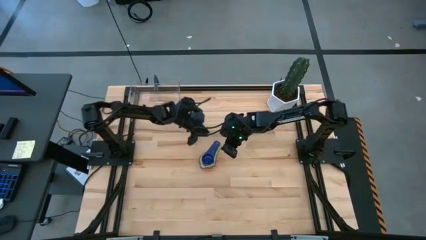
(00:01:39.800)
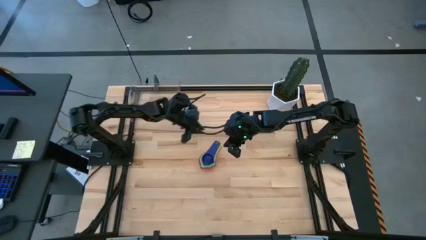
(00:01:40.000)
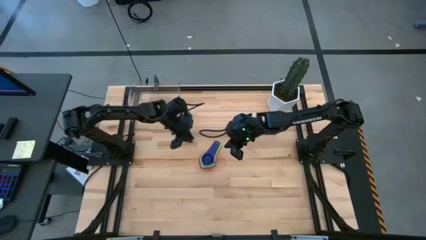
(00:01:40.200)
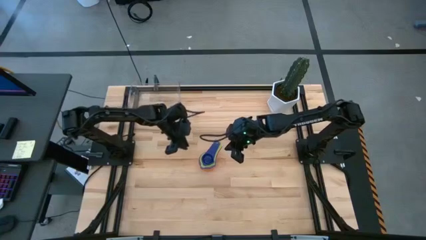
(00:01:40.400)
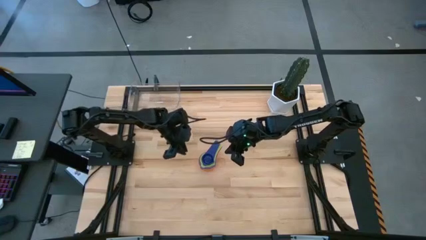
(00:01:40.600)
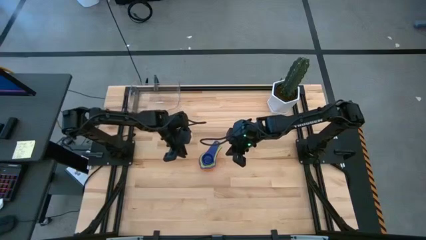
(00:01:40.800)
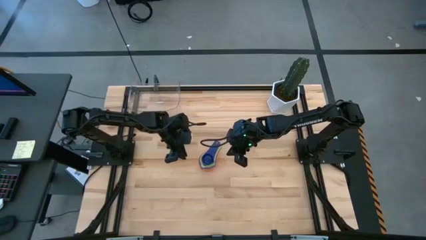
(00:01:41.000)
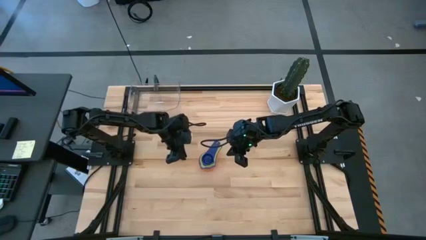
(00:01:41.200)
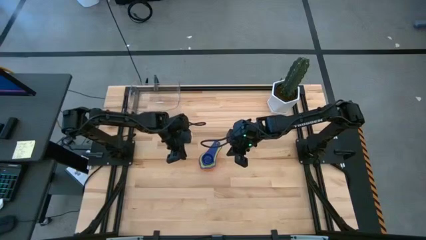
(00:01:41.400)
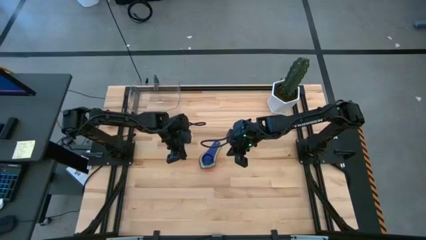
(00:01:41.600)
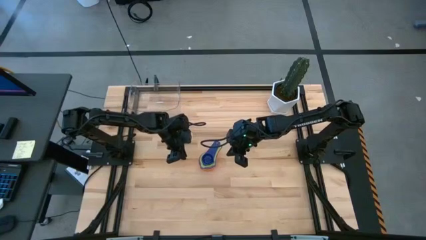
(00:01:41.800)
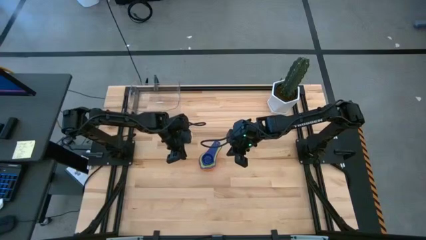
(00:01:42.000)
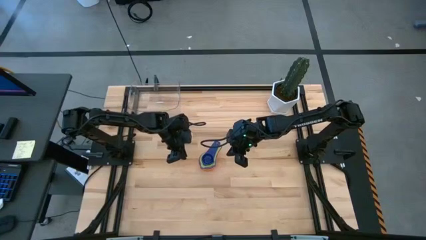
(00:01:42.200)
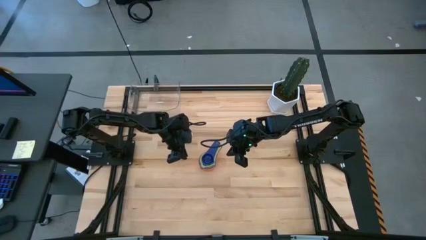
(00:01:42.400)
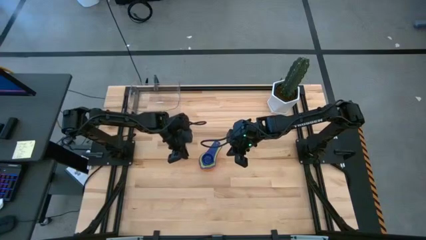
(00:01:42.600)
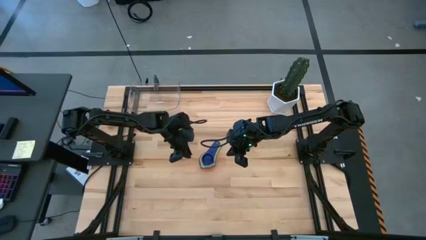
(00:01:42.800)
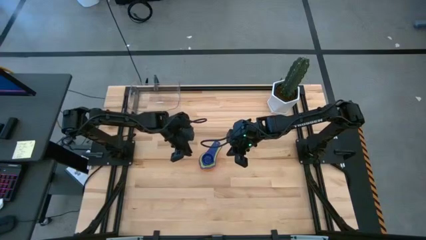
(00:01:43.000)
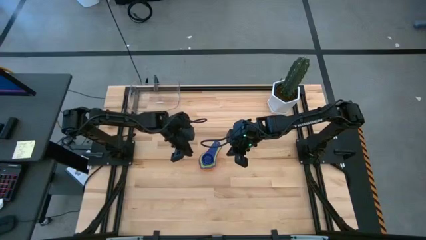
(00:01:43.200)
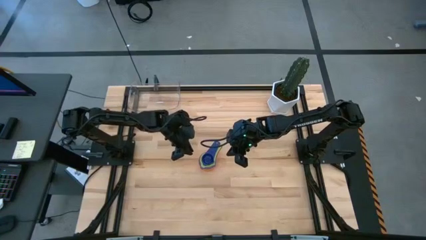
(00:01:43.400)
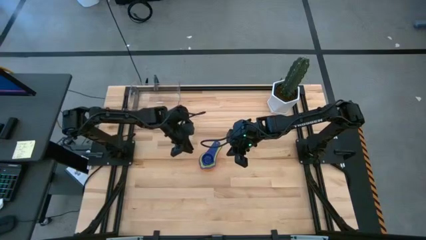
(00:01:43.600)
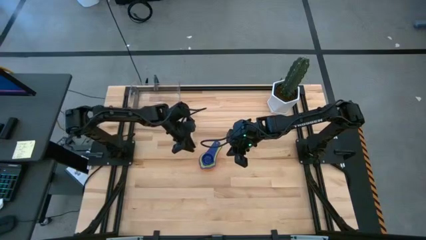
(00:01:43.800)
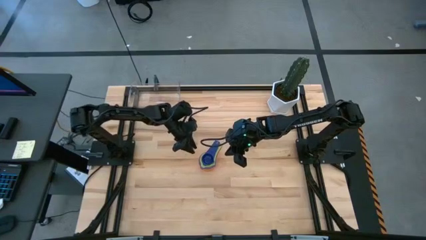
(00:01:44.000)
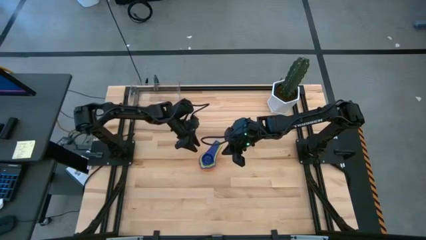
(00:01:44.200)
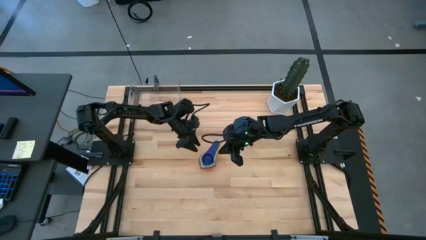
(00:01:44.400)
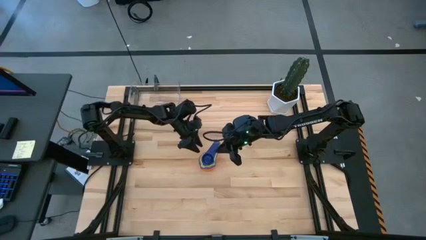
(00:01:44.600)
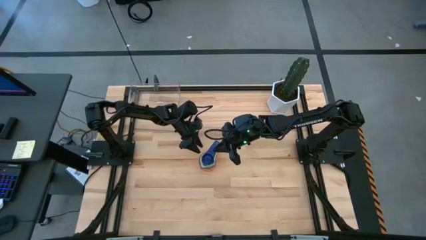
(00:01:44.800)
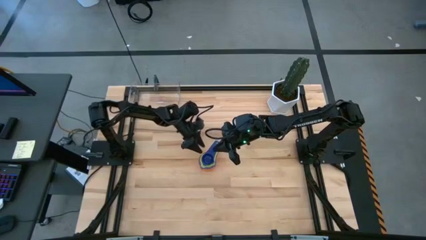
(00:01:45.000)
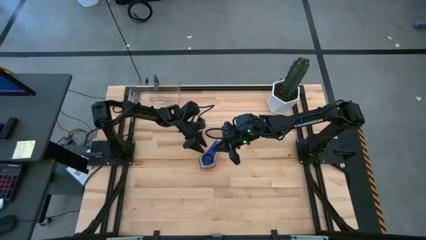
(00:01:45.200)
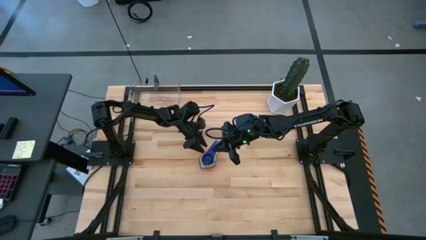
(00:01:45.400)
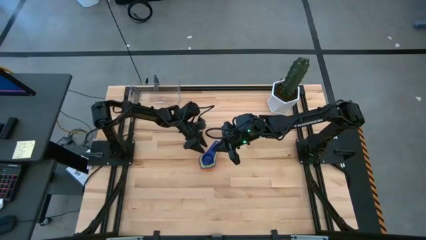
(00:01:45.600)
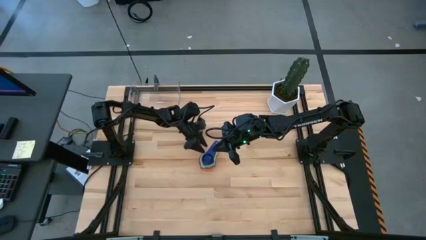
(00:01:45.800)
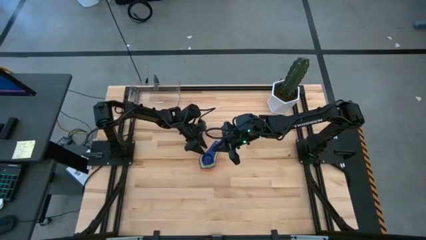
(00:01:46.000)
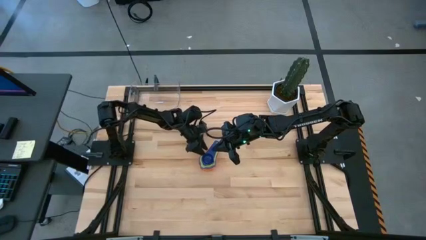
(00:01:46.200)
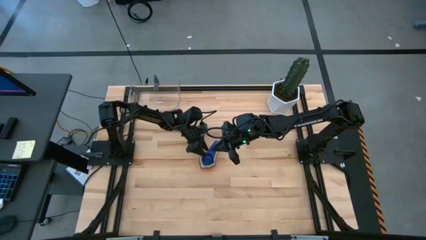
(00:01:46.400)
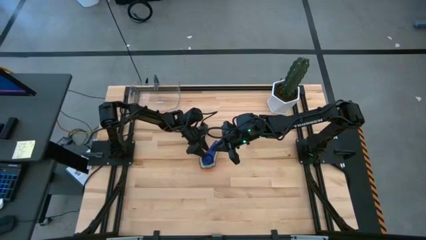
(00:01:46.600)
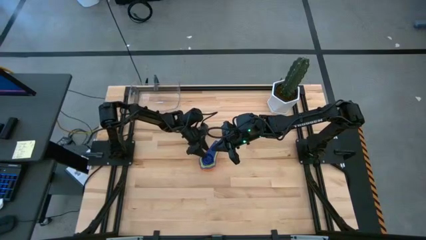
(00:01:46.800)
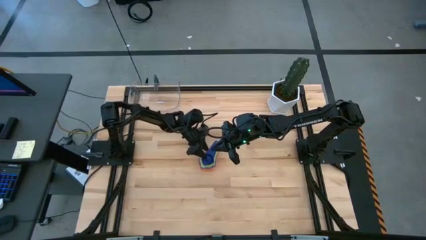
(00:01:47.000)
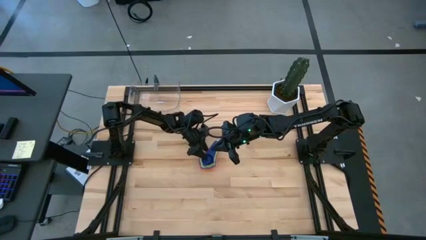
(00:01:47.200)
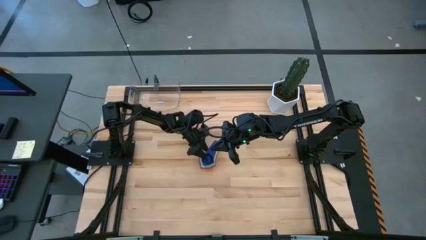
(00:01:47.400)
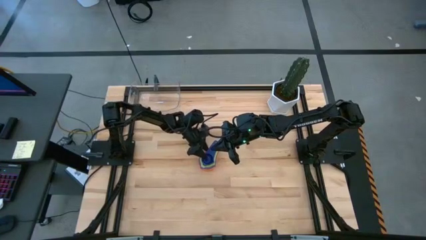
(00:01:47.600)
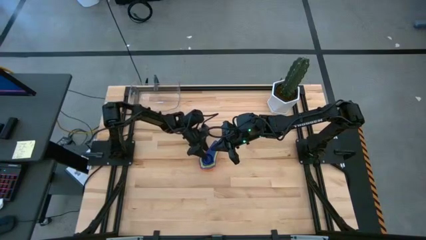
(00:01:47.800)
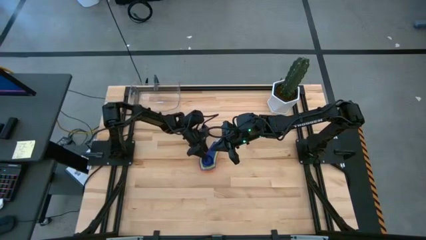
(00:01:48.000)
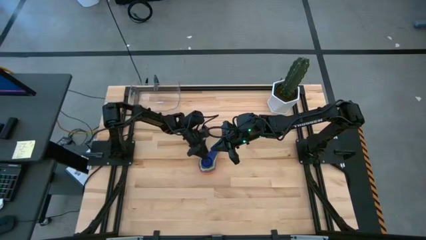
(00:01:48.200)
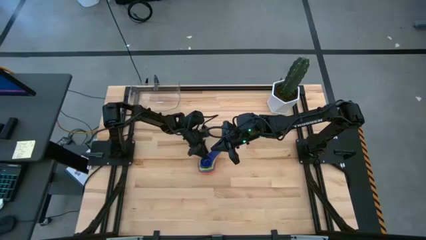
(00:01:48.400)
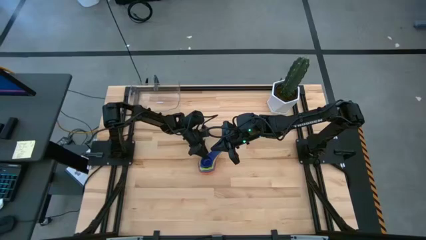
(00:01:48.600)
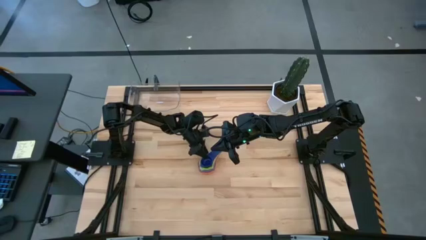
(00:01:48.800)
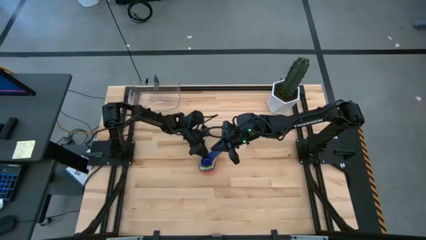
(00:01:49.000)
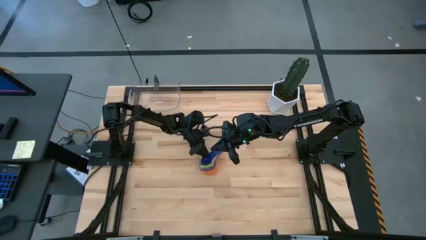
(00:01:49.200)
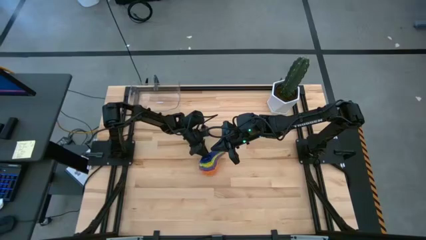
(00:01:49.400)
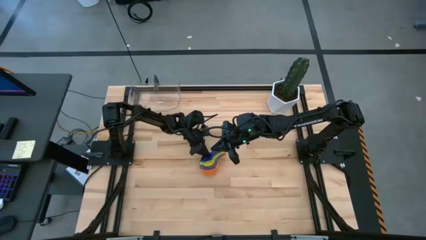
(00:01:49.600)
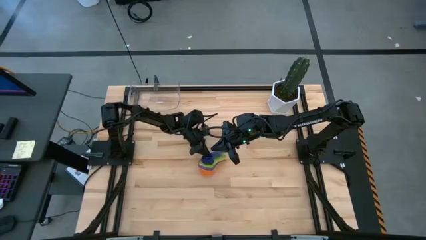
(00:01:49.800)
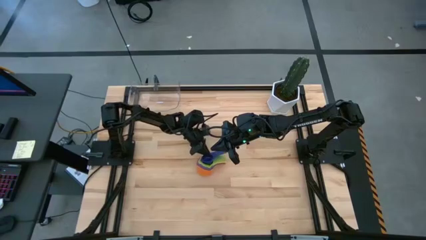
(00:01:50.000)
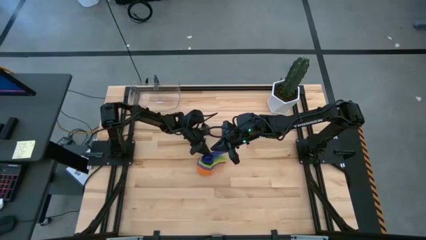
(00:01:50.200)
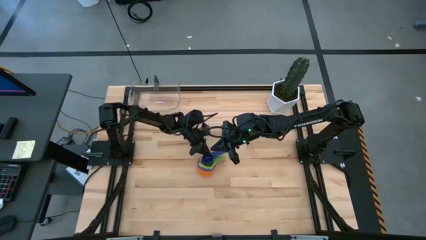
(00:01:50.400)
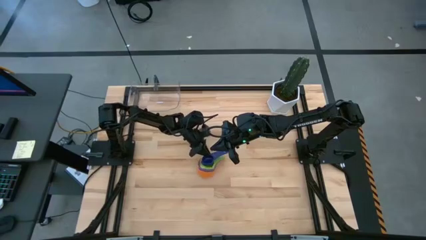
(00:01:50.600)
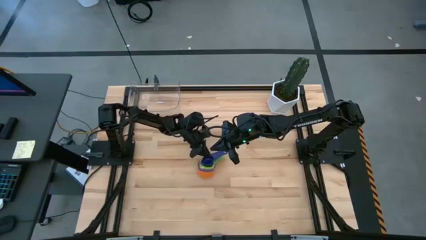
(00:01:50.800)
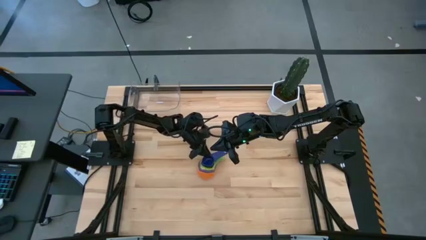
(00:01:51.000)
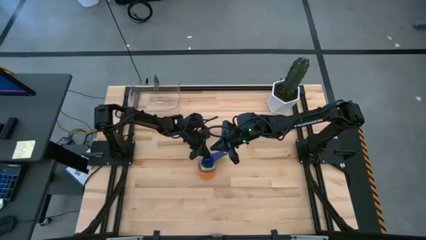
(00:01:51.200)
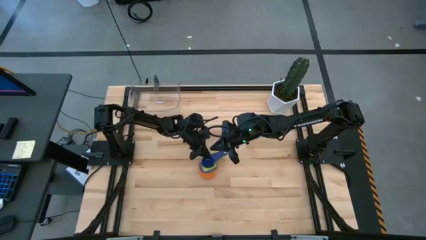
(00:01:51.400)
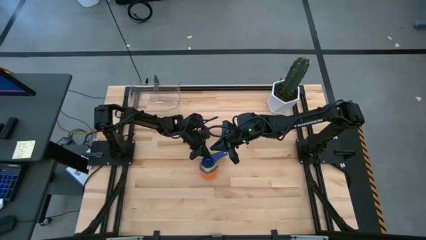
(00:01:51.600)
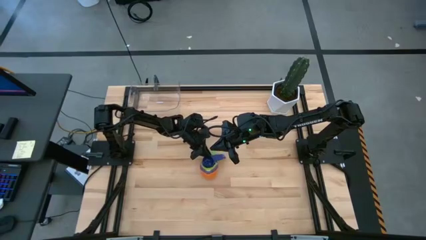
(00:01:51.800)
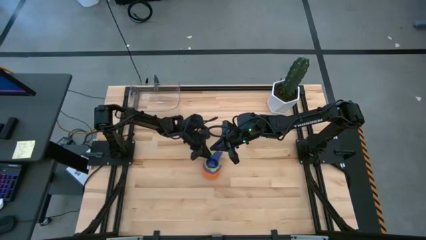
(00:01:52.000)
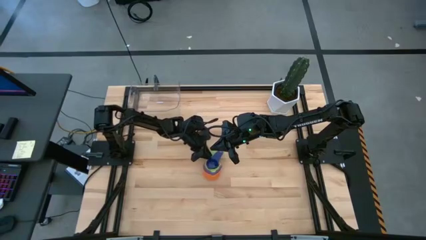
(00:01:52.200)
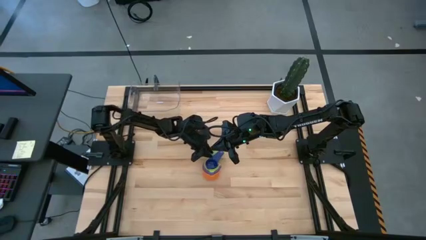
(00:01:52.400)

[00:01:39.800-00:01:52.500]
Task: Nest measuring cups in basket
Put the stacked nesting measuring cups into the transparent bin
